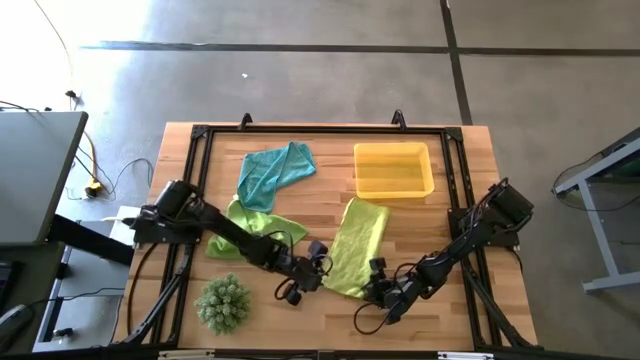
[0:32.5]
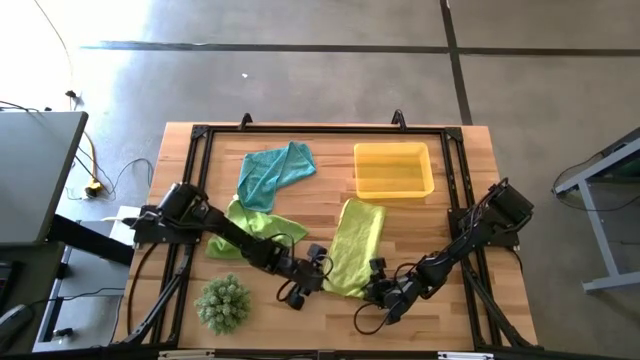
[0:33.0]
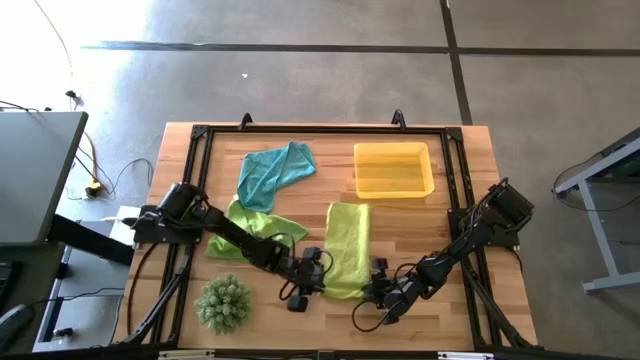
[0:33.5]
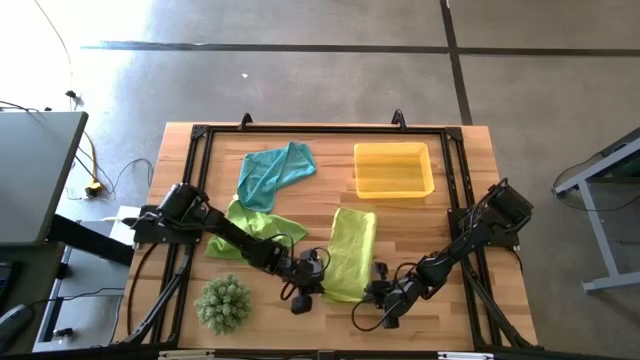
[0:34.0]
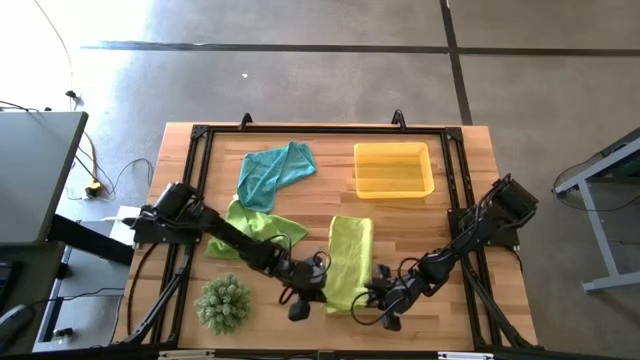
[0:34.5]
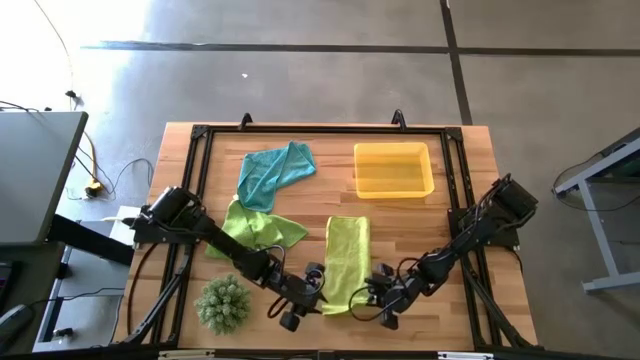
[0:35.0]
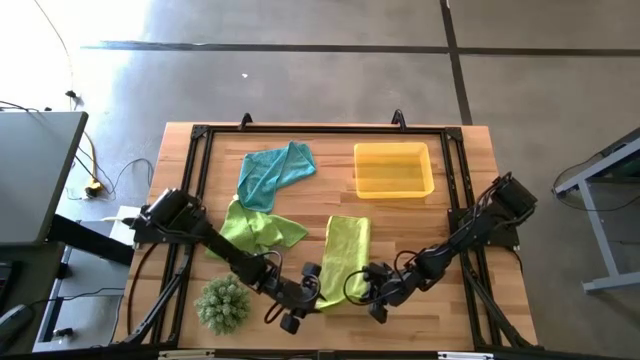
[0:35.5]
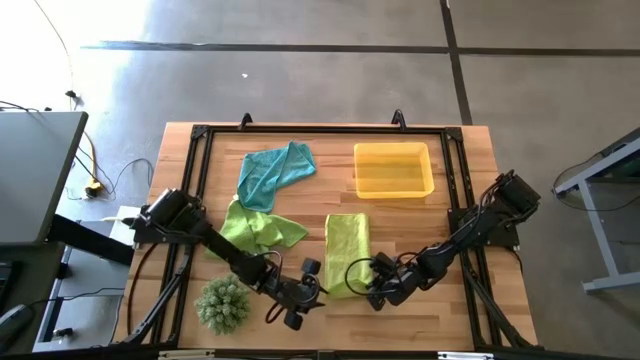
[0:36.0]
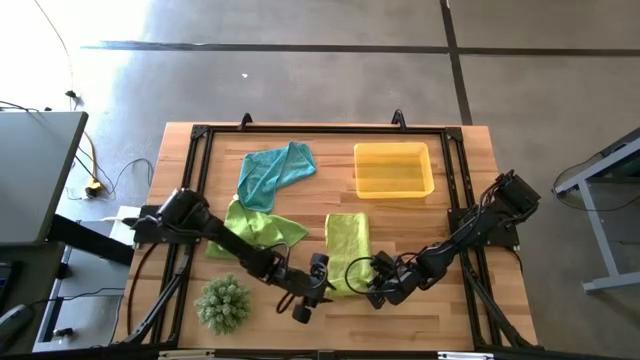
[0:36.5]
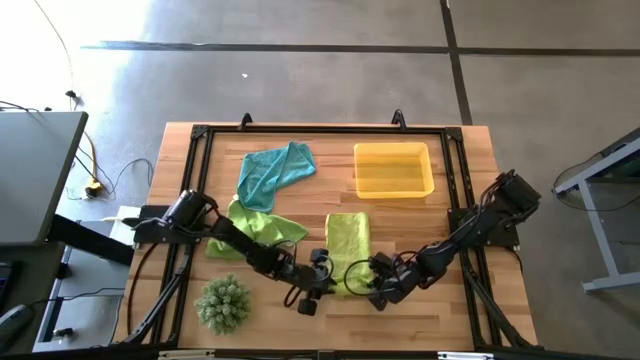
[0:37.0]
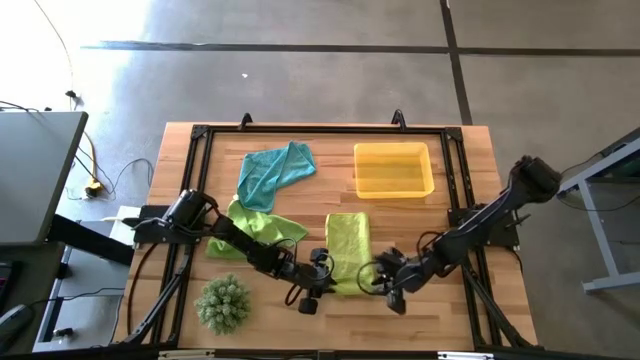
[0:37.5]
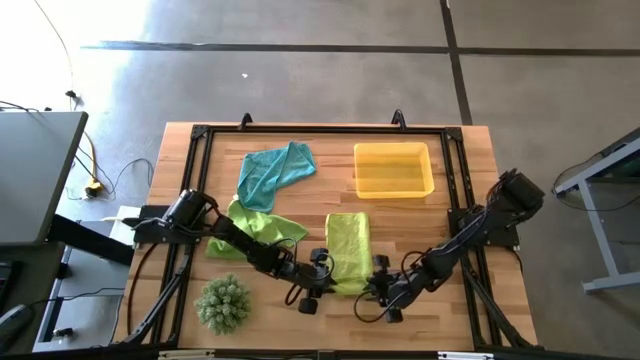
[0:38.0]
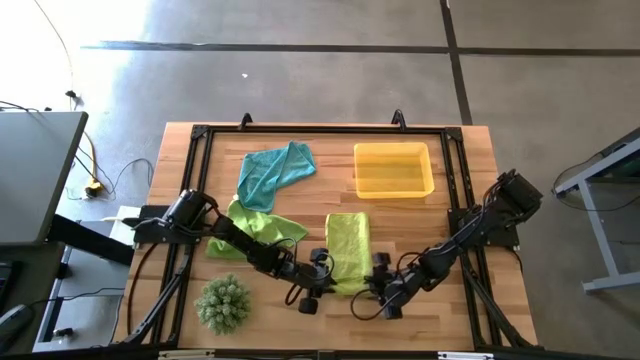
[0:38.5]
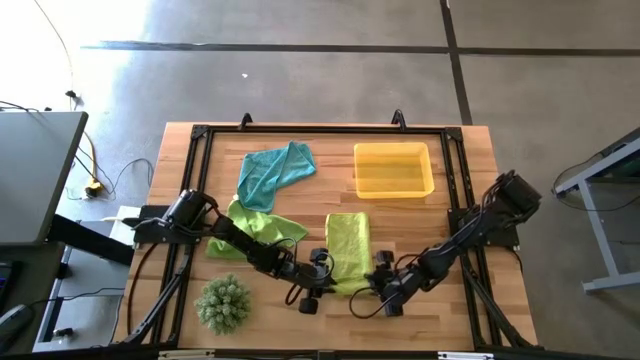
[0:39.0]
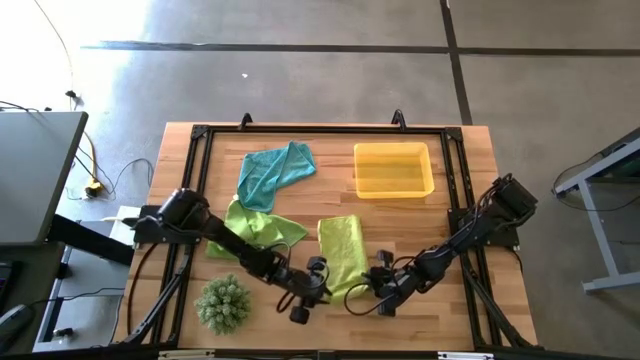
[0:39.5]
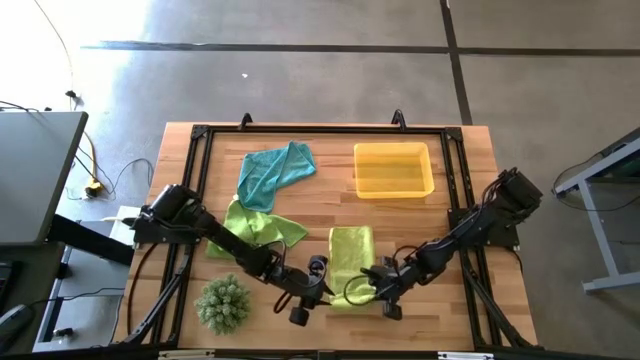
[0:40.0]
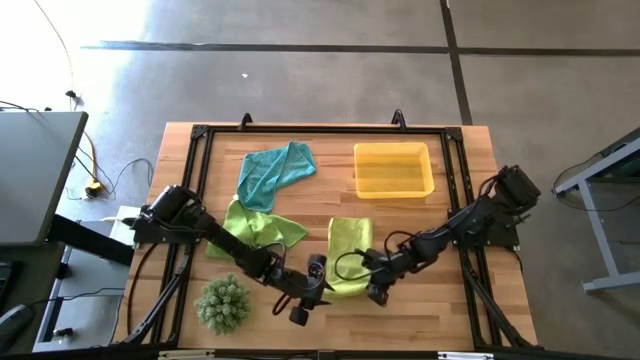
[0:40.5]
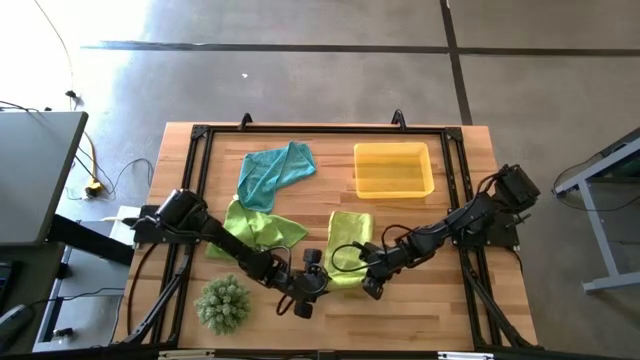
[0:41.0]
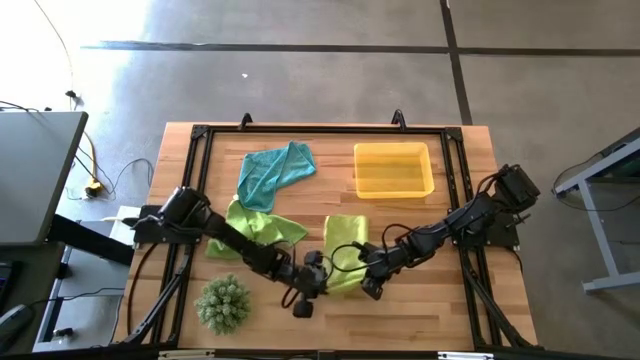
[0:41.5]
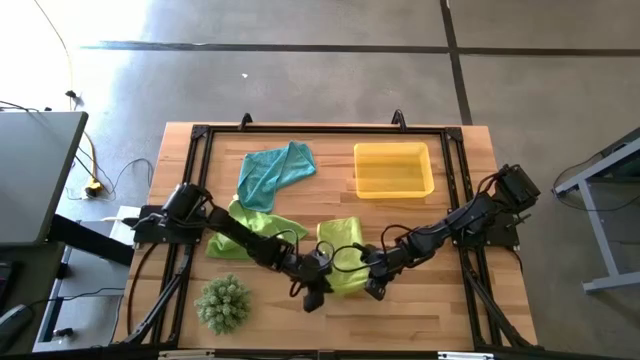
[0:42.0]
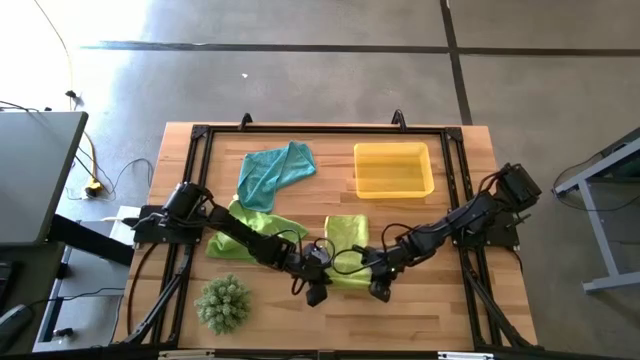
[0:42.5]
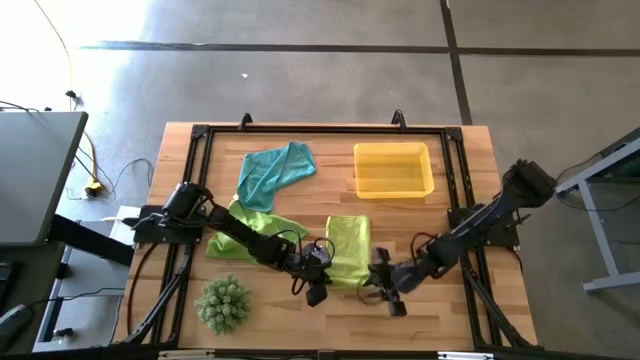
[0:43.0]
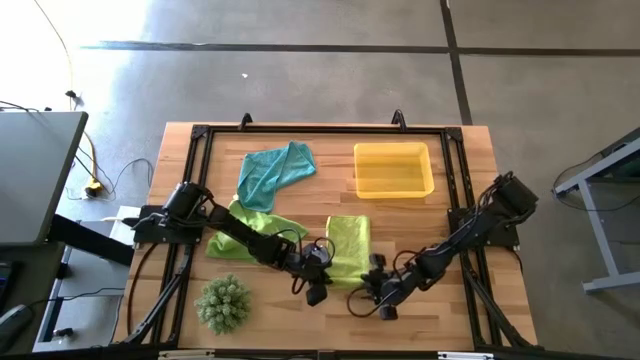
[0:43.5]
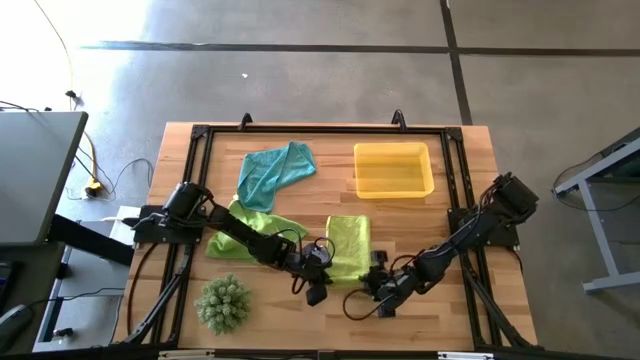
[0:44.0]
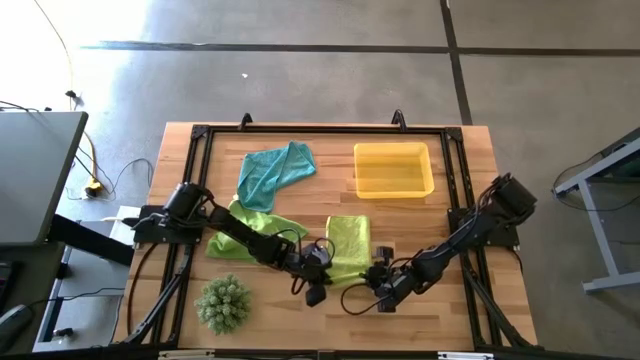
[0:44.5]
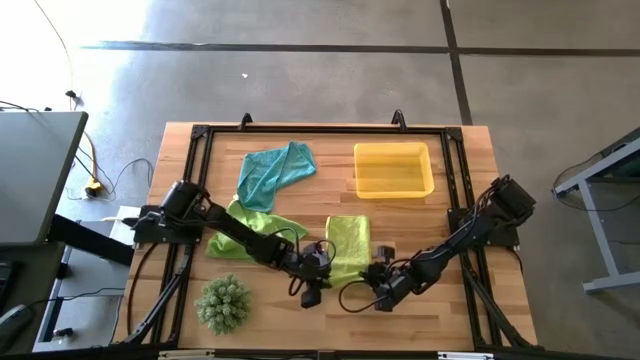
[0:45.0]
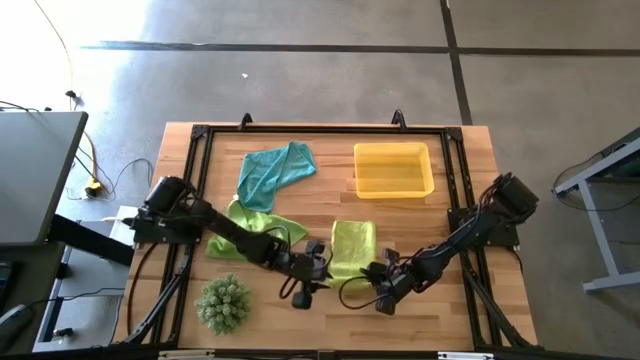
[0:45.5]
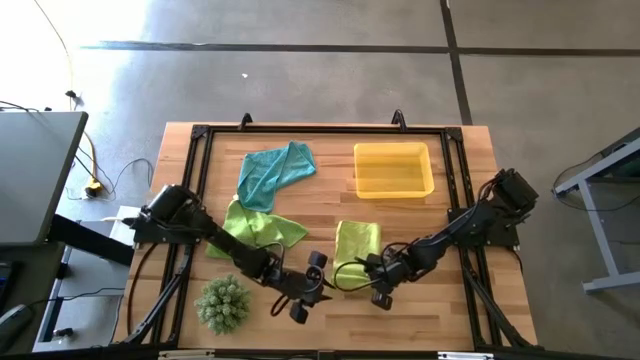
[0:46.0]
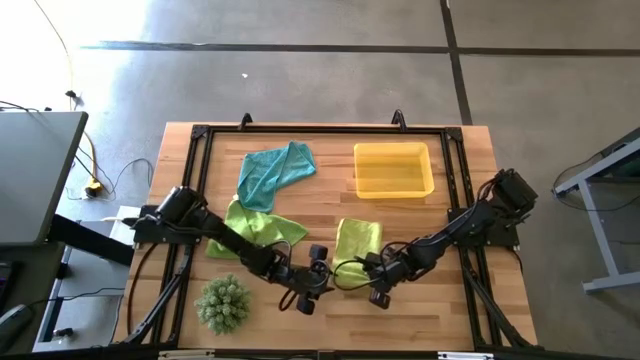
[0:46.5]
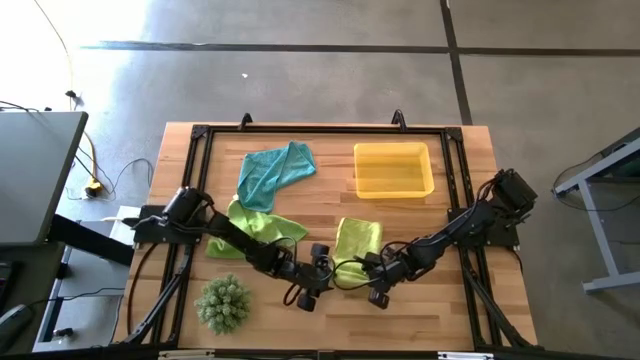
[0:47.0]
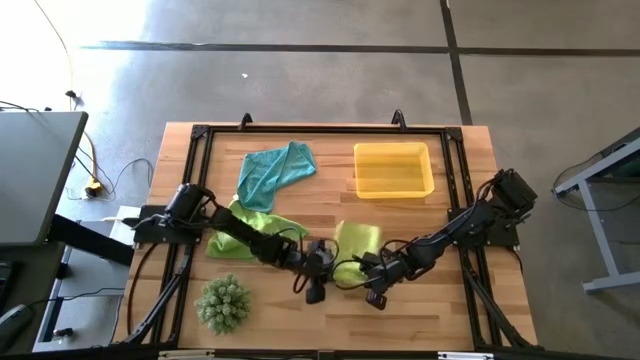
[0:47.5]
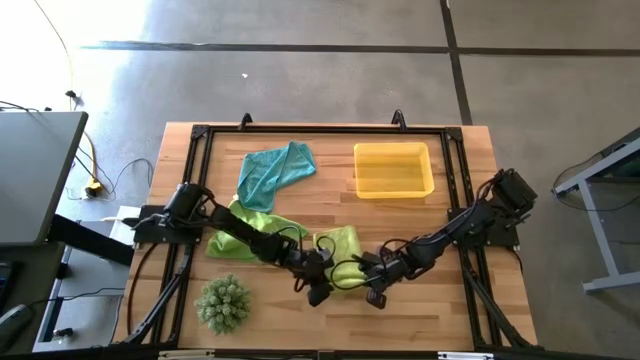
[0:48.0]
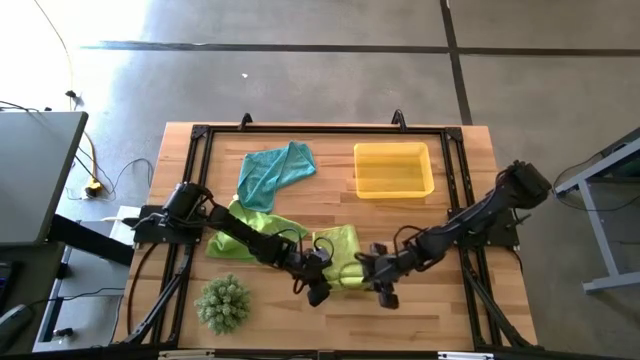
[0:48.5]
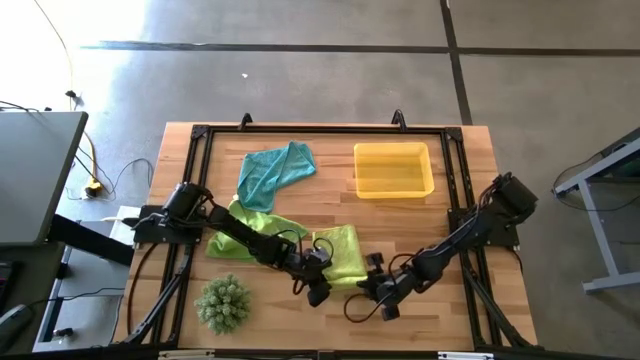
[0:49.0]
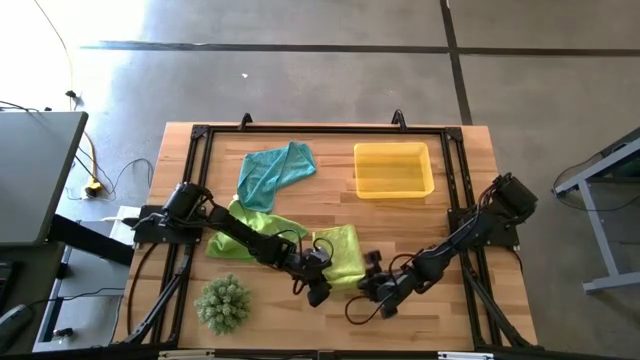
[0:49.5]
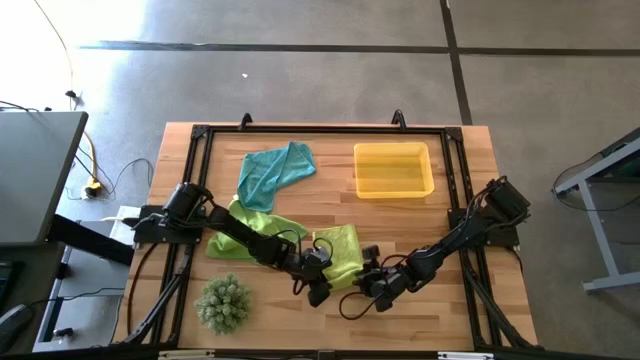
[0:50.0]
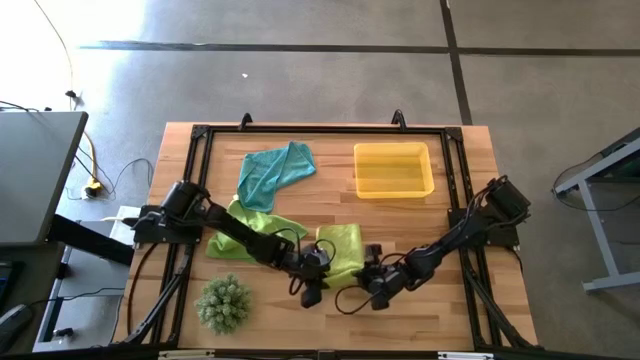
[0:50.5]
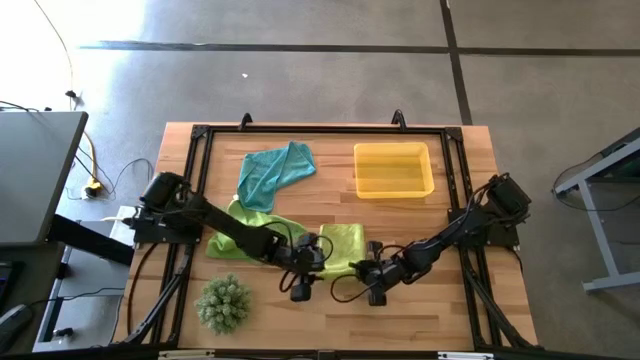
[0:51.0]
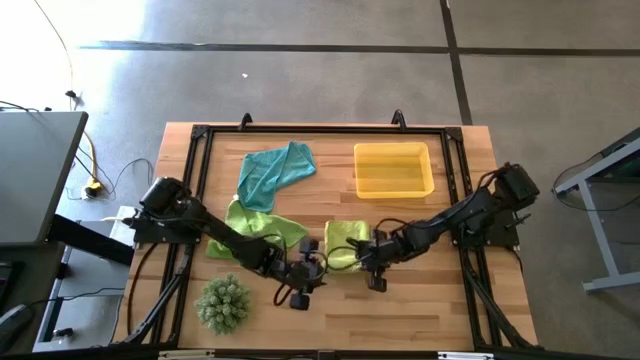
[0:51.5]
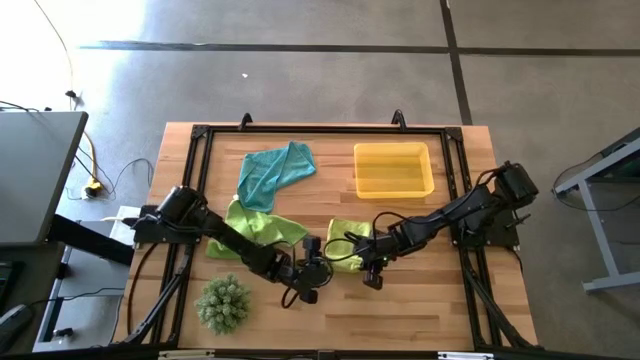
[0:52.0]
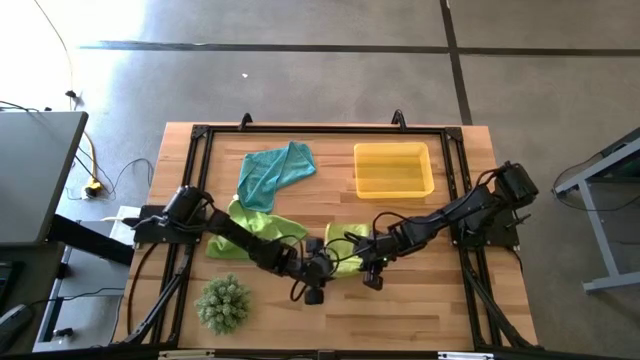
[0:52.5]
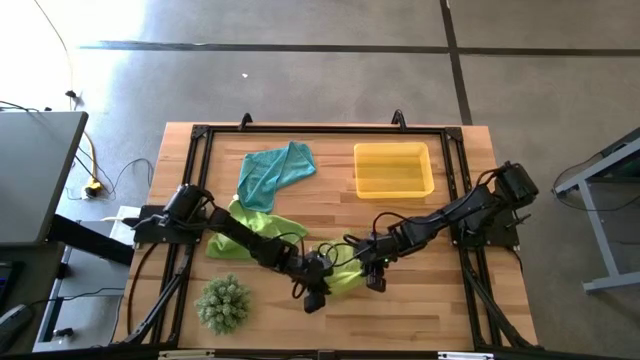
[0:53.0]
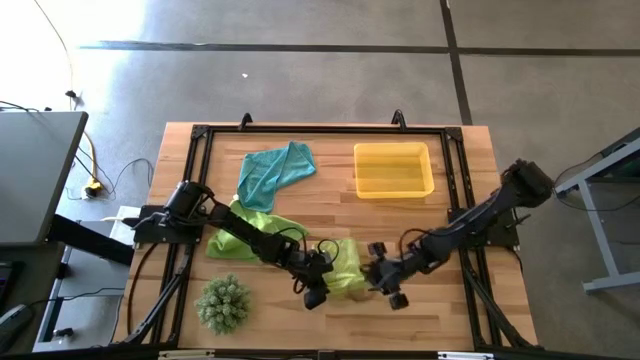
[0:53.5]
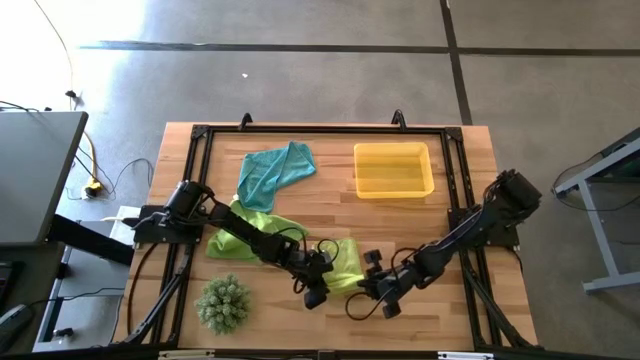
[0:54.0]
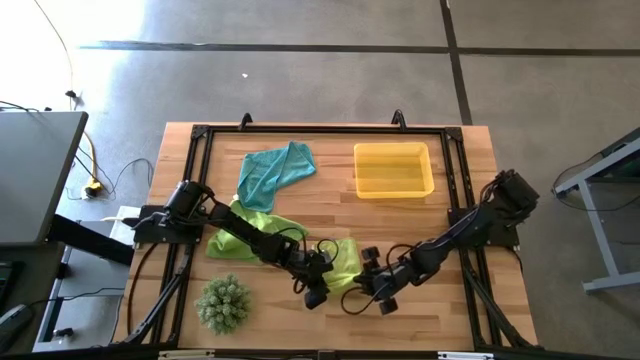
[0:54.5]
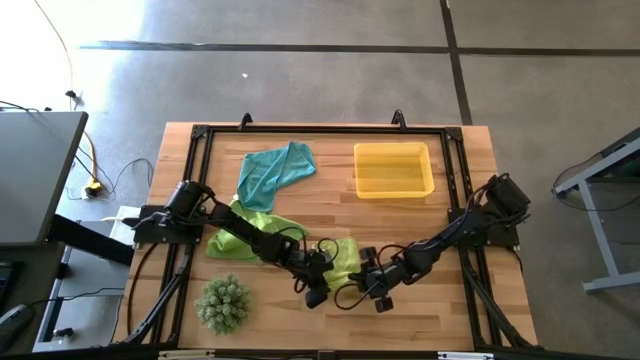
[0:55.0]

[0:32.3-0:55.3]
Task: Roll microfiber towels into tight, uniform cylinder then place into a basket
Roll the light green towel
